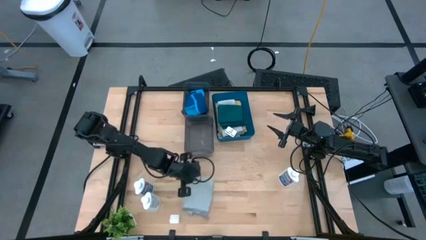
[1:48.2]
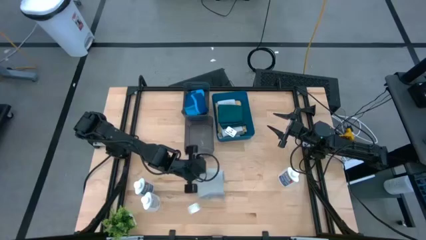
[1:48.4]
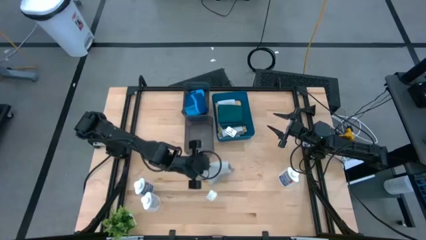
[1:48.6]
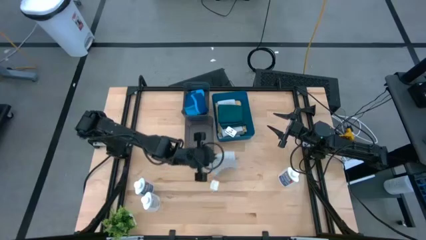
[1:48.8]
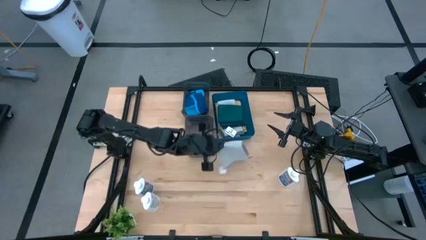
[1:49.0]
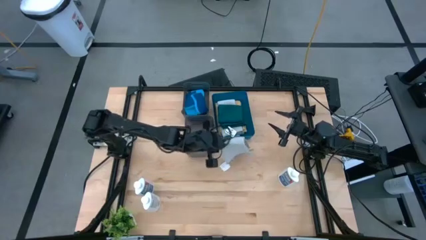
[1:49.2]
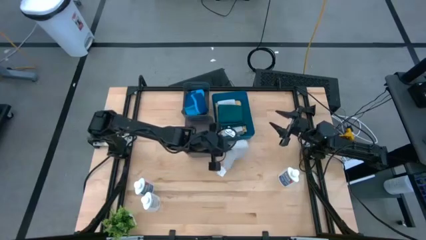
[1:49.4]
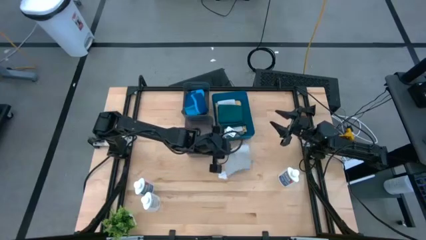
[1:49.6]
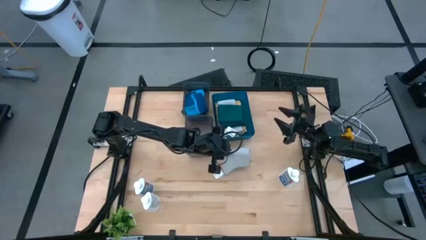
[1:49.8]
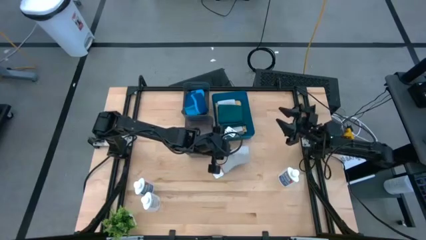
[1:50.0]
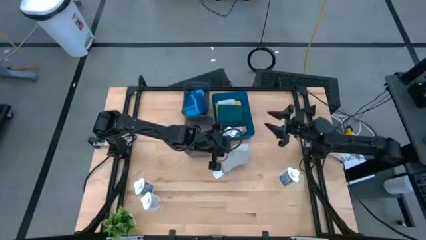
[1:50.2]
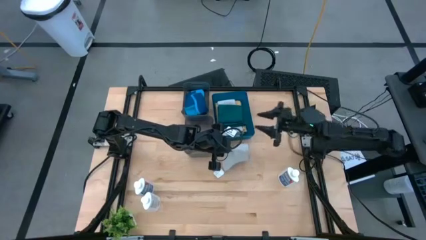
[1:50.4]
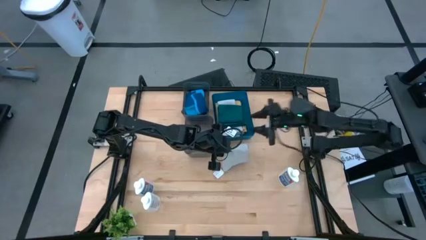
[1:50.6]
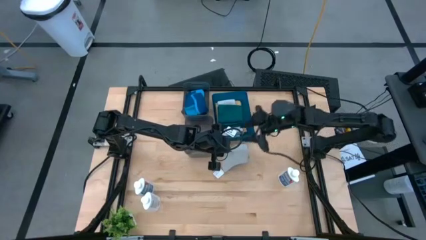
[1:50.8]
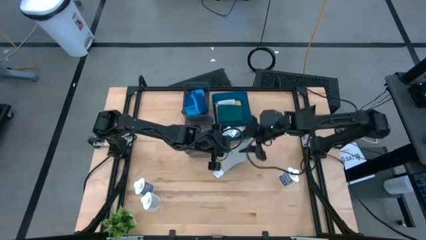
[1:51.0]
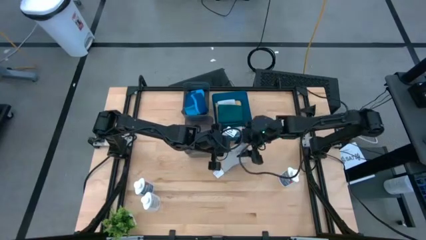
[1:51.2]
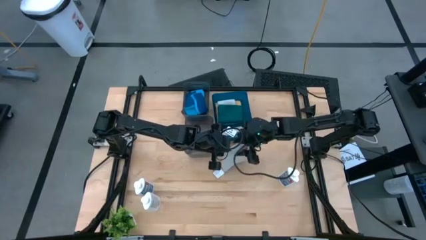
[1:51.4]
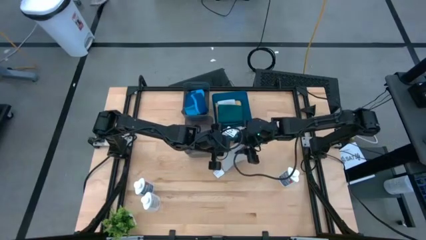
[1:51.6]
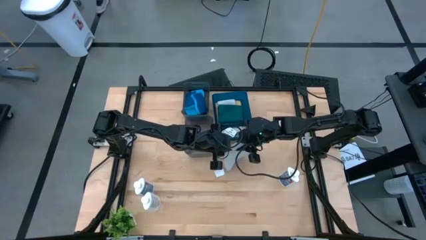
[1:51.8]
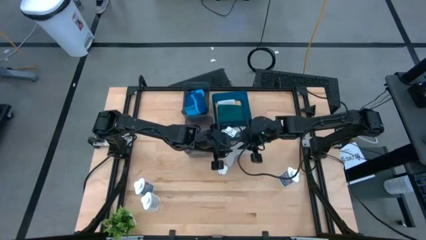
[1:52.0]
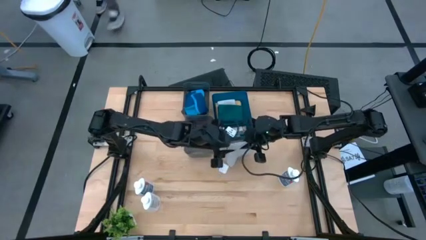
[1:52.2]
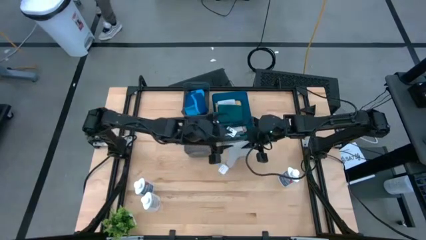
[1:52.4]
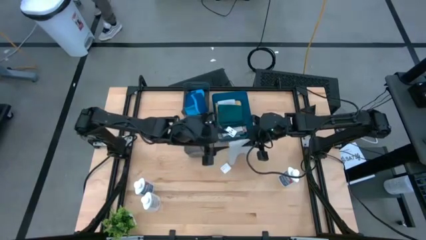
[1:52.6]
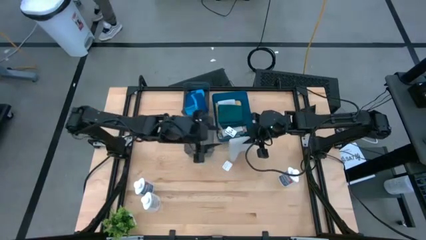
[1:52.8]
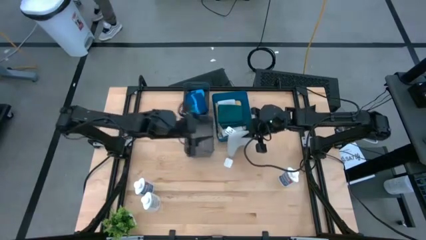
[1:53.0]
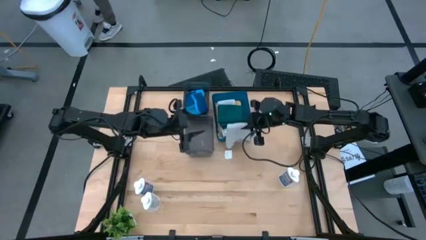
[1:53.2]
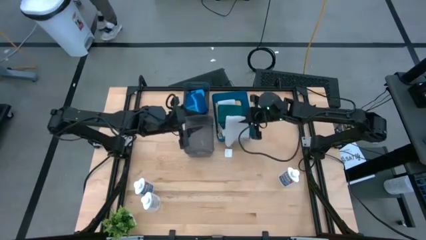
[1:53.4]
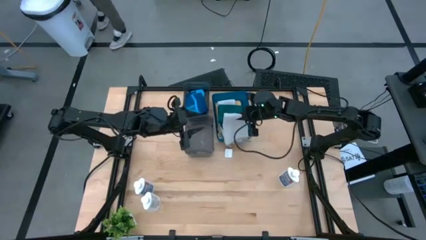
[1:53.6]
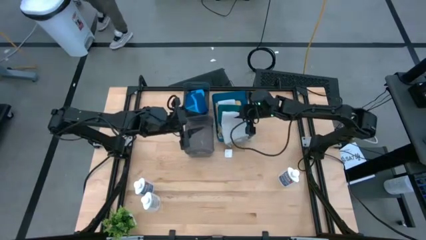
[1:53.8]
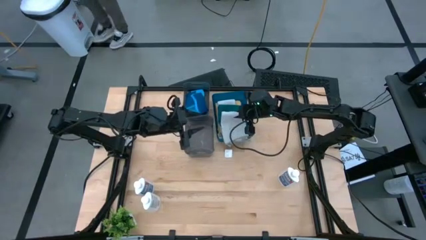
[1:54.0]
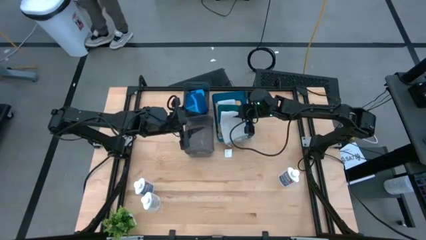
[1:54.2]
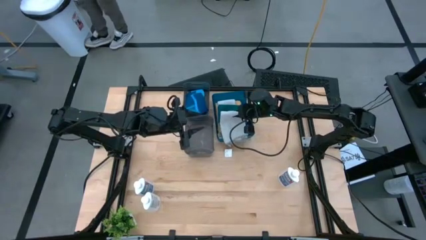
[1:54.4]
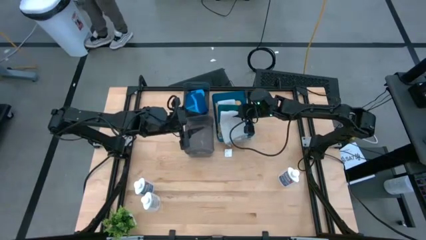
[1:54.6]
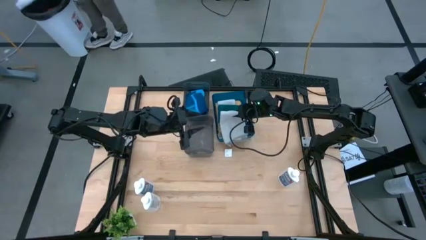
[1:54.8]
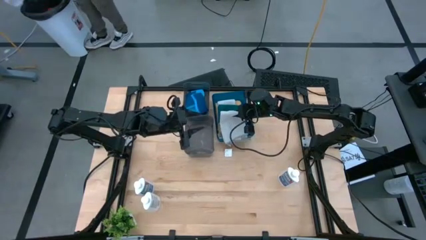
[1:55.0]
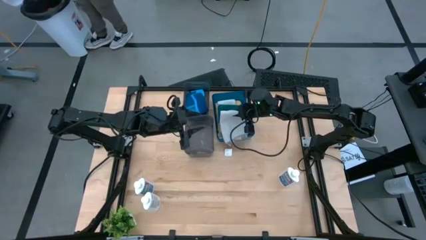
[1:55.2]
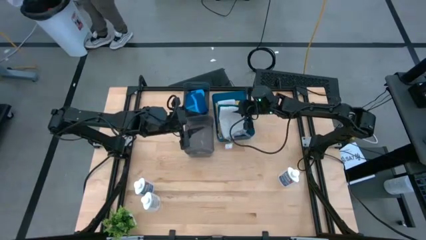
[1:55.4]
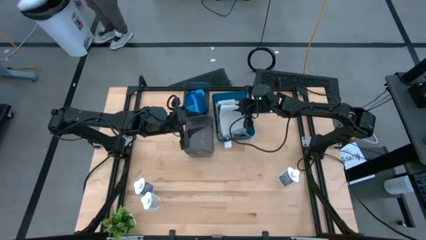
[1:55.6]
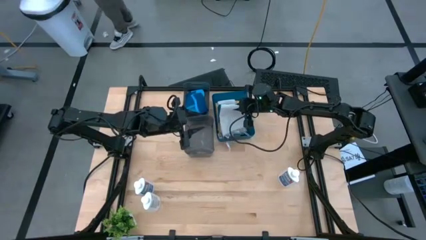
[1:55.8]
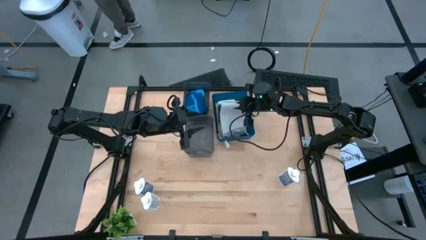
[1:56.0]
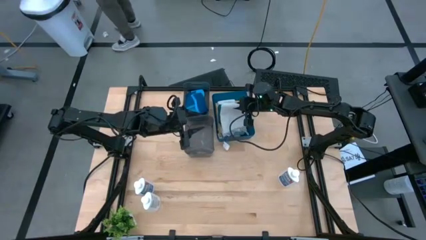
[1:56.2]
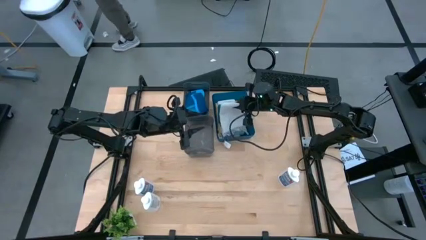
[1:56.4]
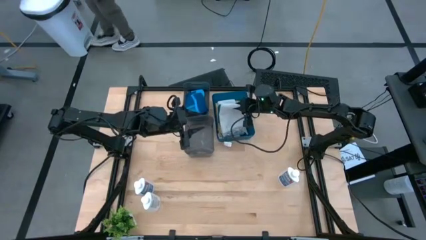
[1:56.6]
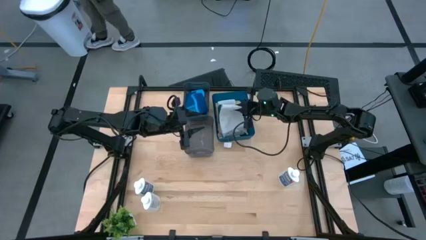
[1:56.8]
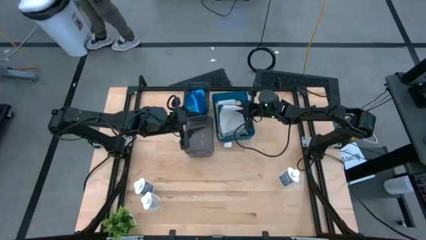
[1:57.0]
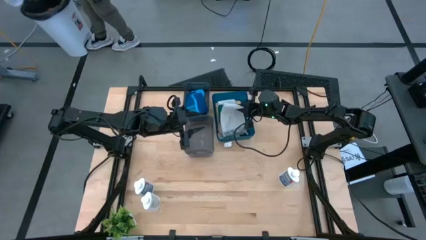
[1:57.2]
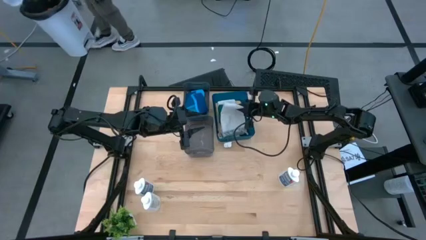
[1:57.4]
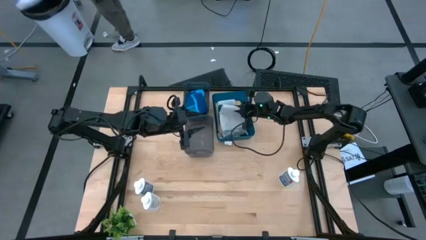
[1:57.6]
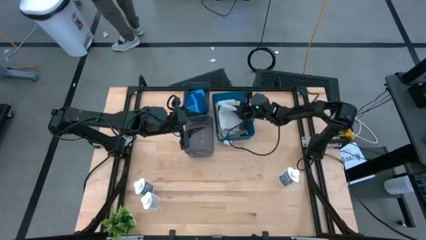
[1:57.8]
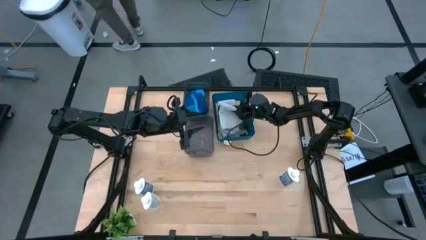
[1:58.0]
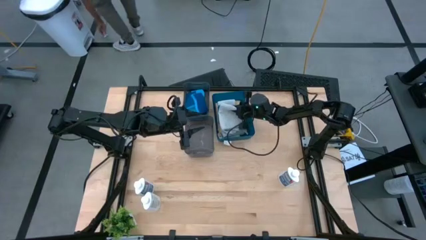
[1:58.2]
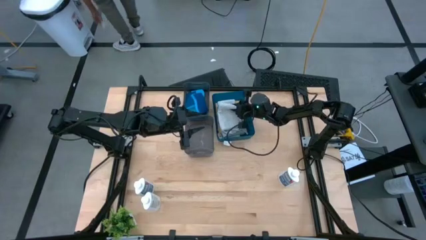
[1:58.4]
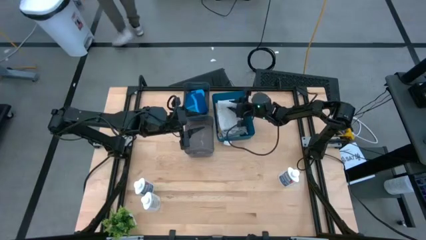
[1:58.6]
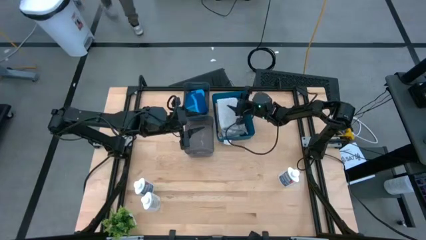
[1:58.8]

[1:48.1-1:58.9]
Task: Pick & Place Kitchen Items
Put the gray towel into the blue bin
